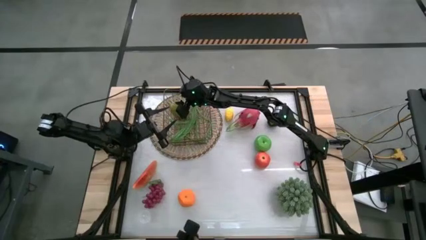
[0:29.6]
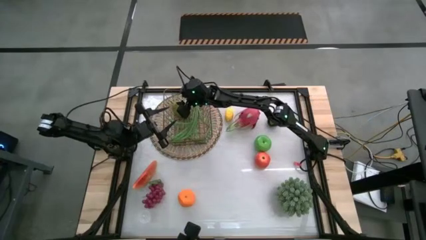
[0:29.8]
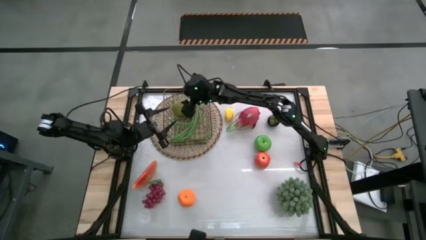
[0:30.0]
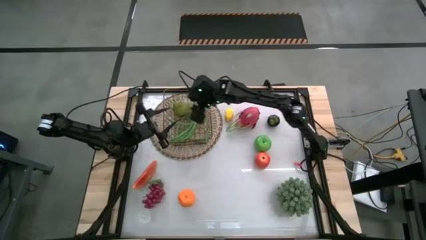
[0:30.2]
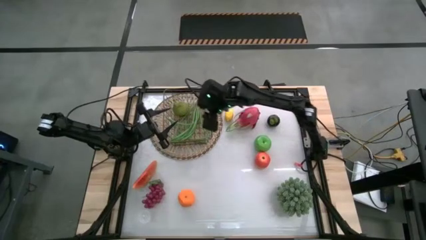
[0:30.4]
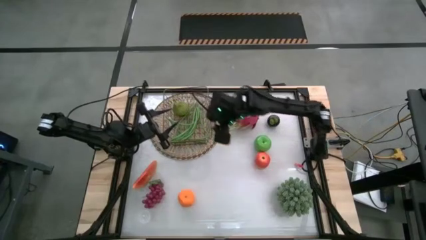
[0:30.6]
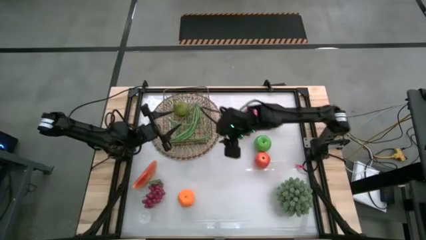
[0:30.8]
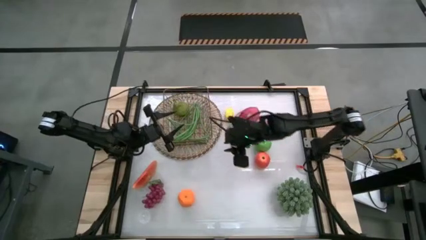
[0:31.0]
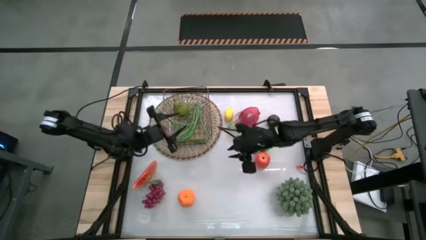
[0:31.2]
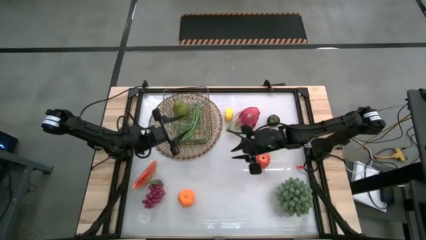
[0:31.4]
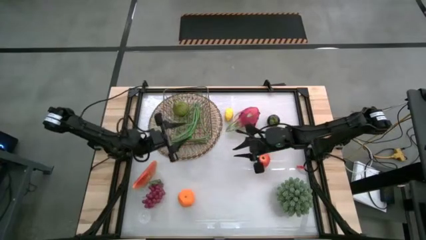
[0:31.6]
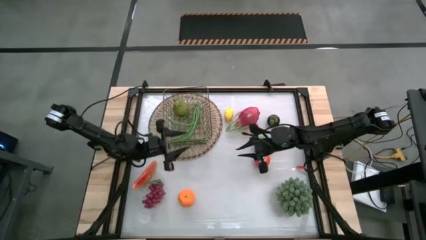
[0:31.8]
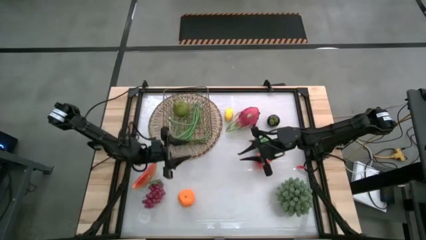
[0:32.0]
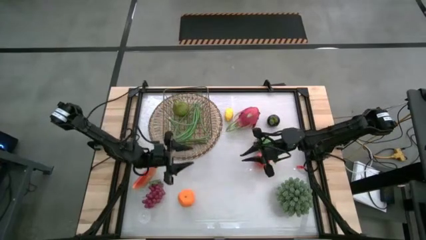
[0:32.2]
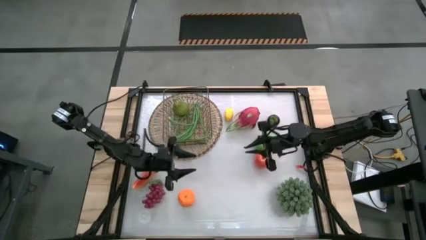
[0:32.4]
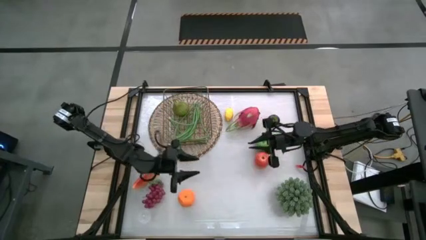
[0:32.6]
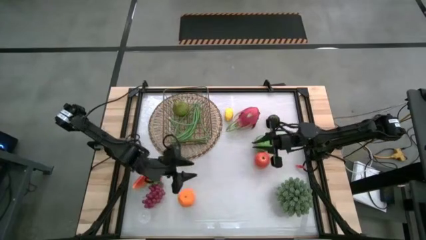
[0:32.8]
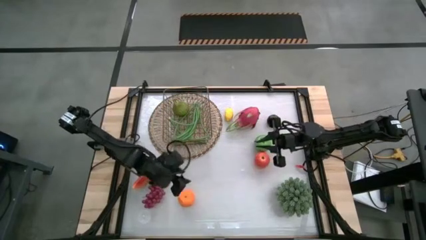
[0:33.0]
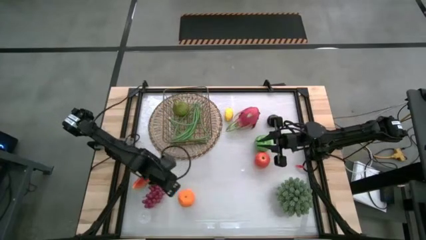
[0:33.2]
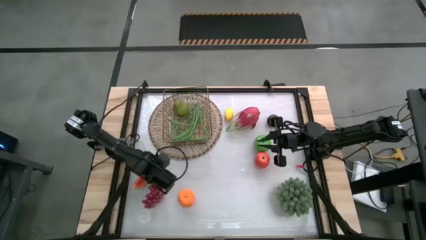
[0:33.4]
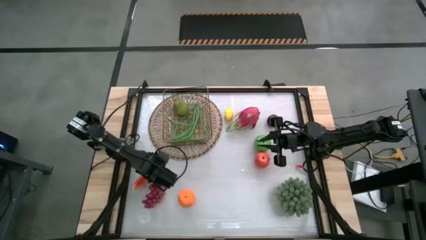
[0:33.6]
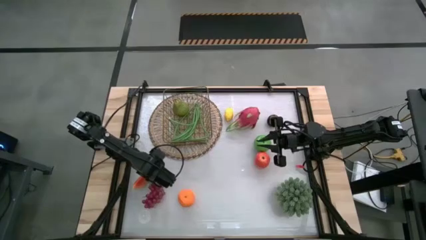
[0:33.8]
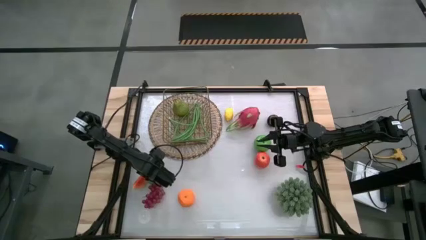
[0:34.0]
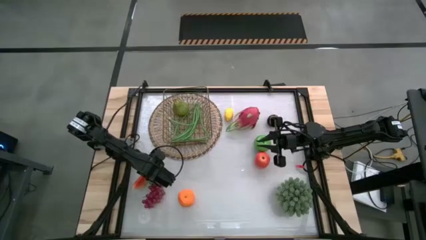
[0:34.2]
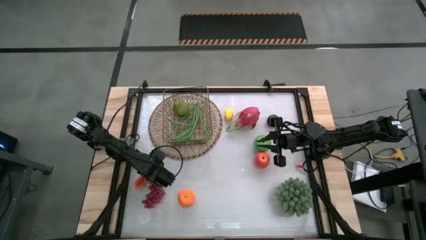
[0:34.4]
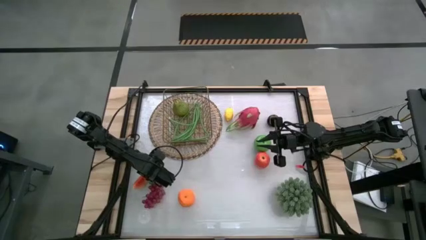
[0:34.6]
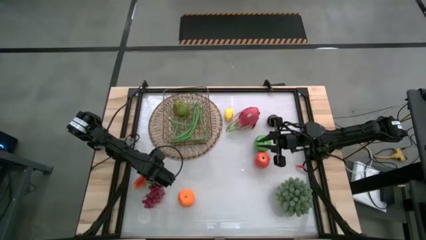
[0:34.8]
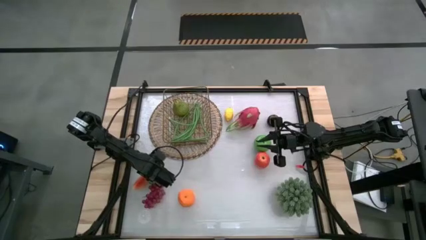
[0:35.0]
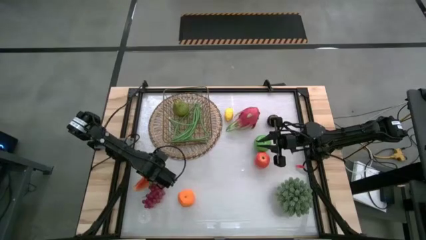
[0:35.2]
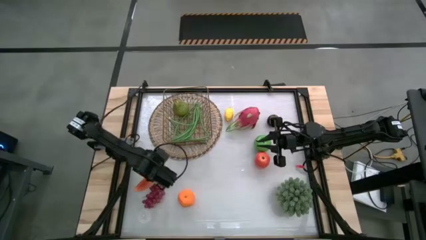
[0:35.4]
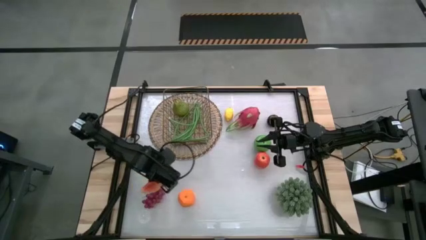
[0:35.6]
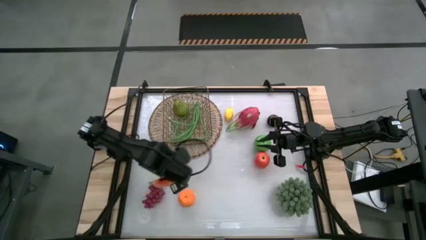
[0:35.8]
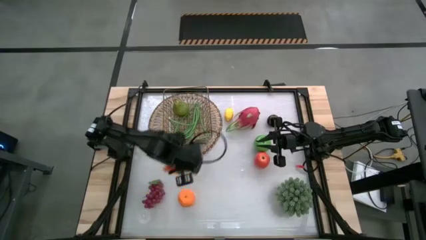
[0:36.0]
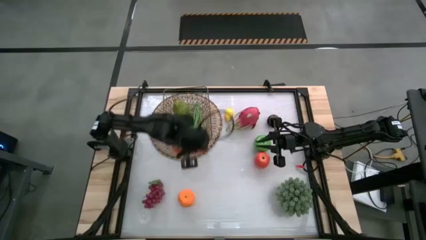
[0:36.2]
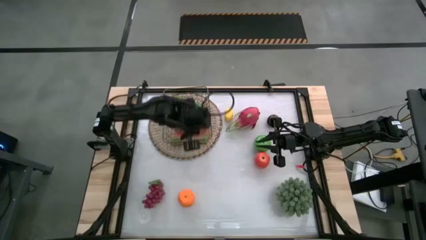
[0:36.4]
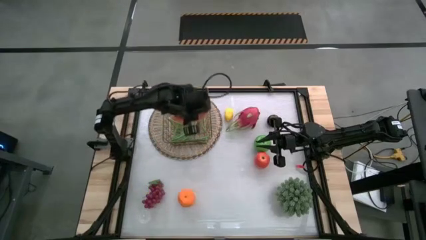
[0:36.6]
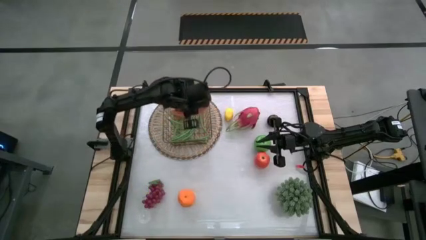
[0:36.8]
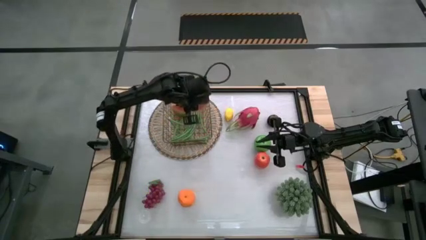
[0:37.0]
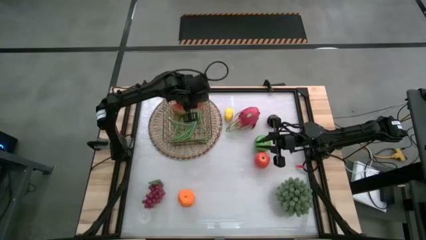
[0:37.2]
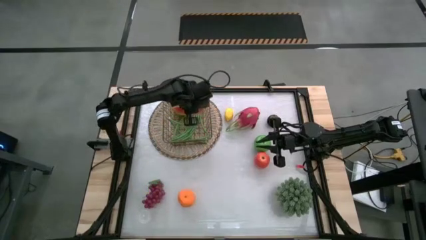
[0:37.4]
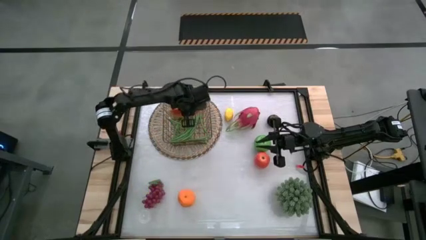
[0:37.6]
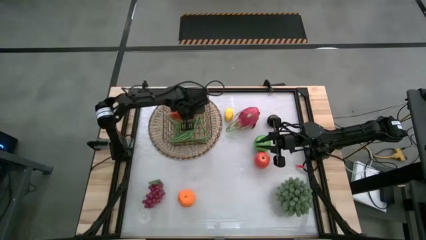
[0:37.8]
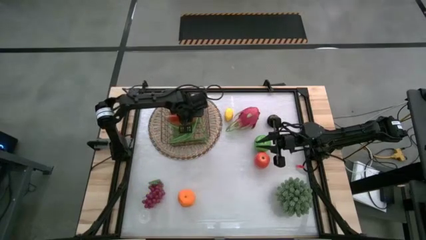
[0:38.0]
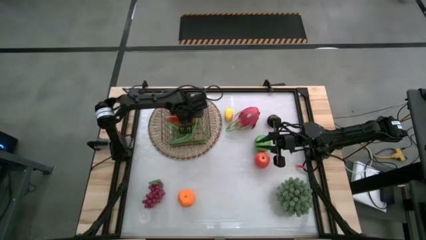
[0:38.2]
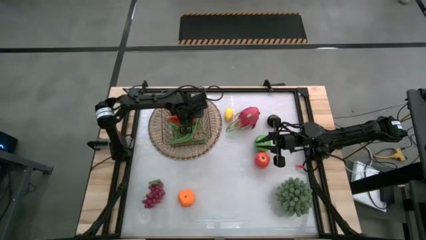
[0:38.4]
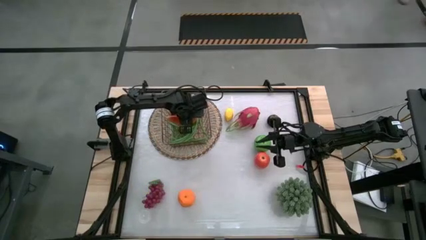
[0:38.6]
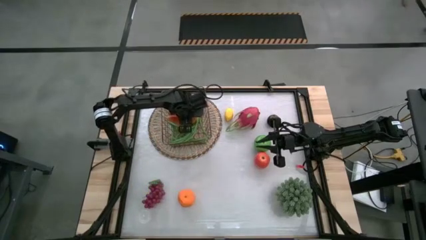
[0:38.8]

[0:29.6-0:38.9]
Task: Build produce basket
Put the red watermelon into the wire basket

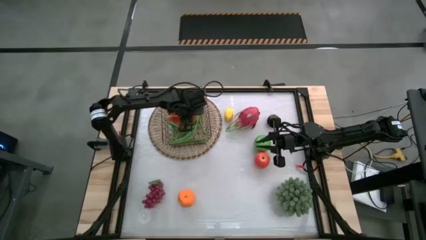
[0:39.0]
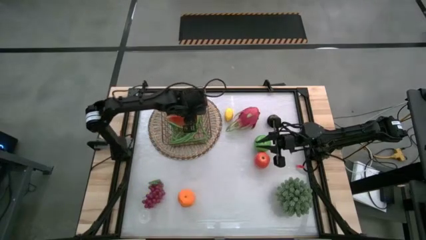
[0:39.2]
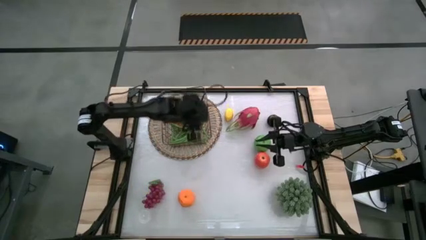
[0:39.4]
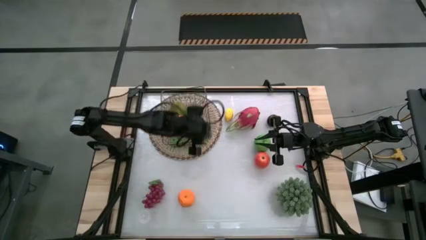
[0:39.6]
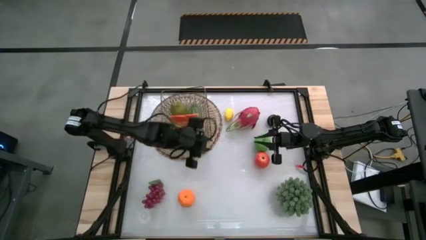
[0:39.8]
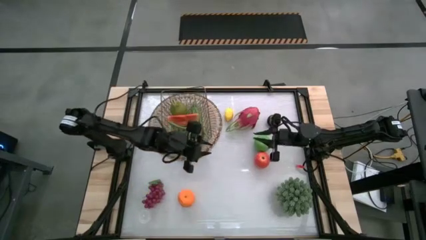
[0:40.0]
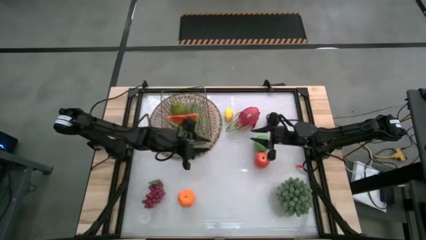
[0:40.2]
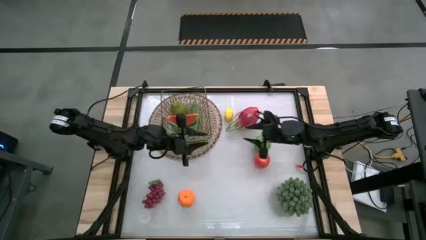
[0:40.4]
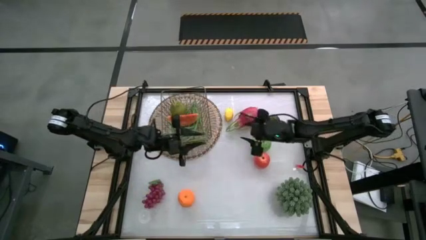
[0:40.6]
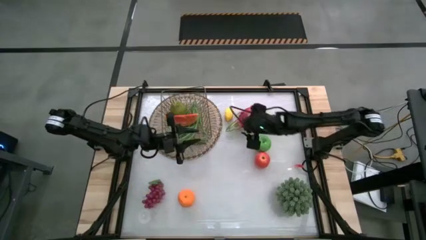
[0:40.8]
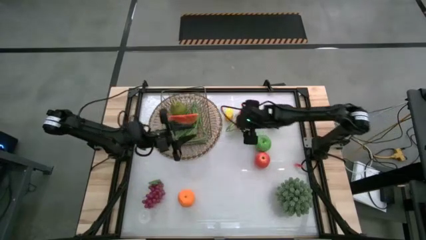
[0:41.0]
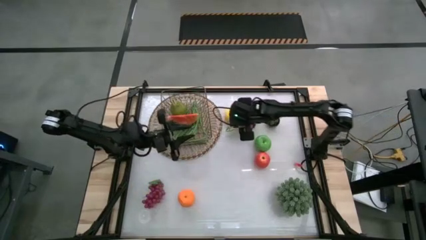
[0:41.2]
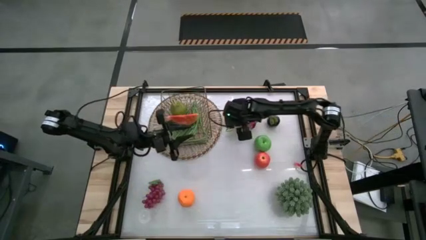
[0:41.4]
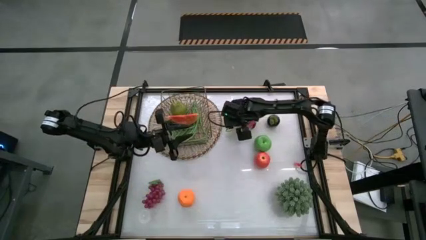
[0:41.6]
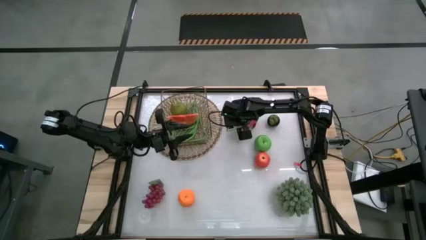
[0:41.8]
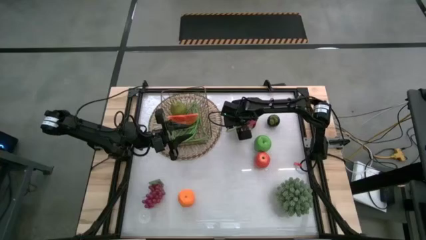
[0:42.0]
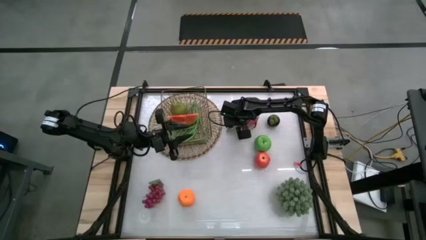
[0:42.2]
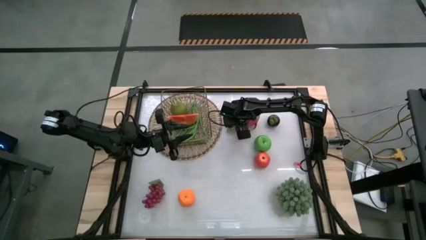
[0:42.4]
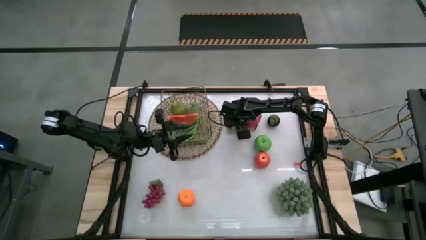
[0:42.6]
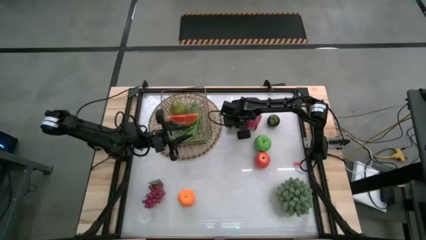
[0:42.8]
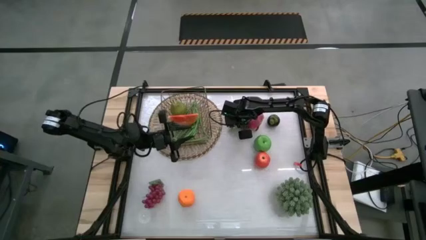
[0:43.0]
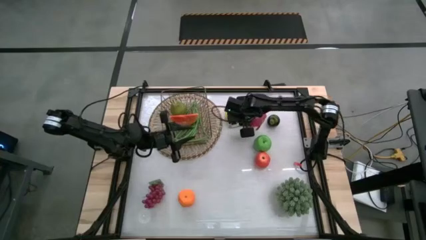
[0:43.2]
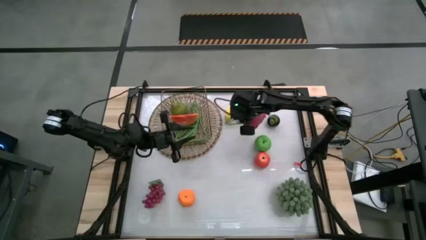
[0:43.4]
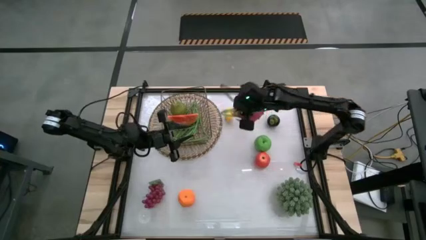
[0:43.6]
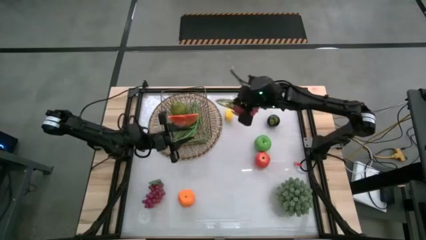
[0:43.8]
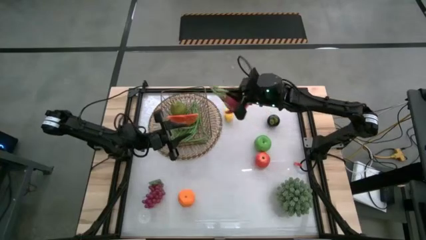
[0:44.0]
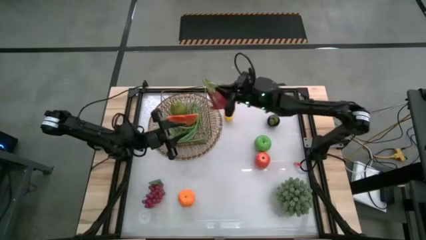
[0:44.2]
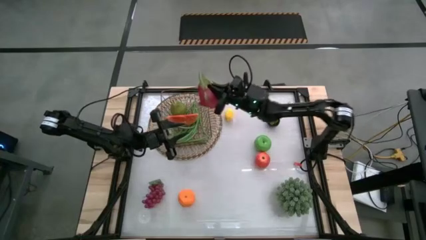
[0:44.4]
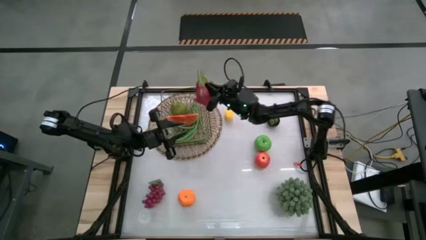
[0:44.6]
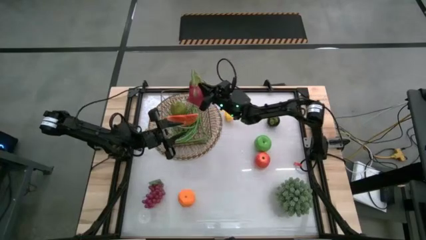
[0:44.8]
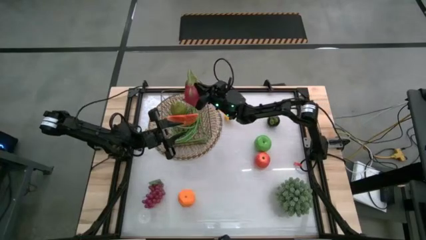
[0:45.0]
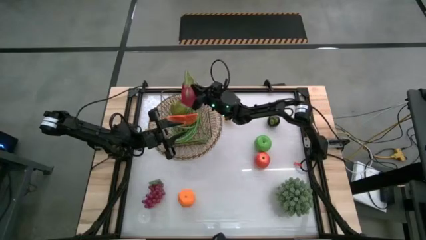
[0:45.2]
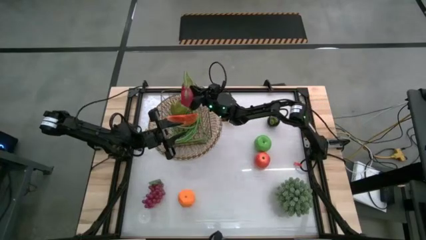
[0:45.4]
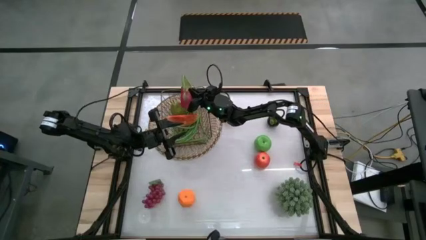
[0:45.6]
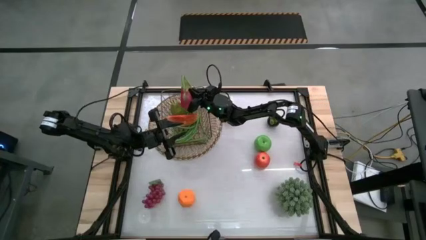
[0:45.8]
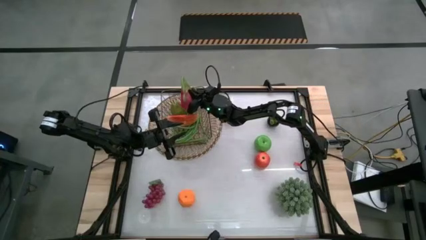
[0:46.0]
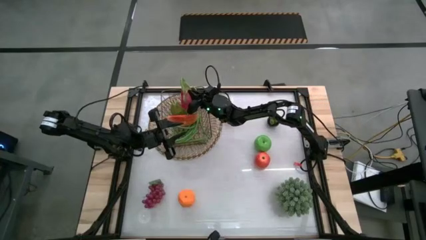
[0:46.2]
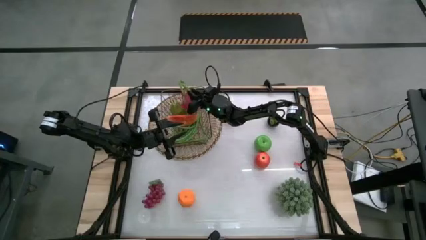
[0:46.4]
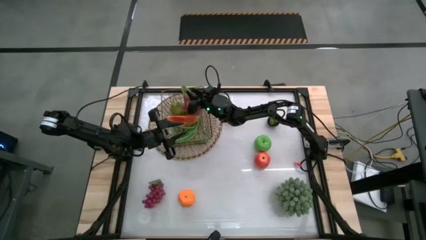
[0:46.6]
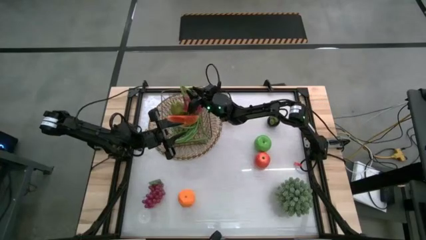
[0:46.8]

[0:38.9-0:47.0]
Put the pink dragon fruit into the wire basket
